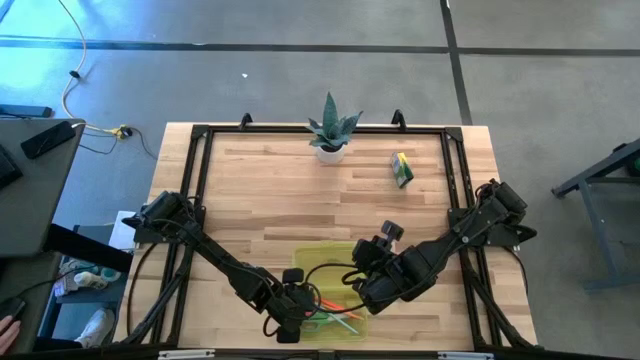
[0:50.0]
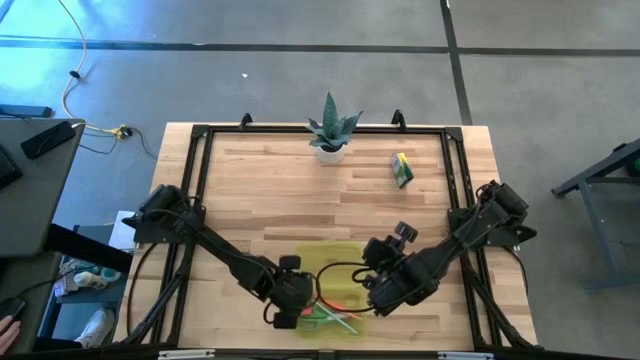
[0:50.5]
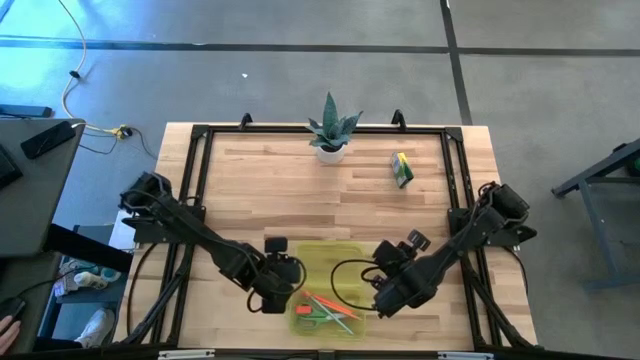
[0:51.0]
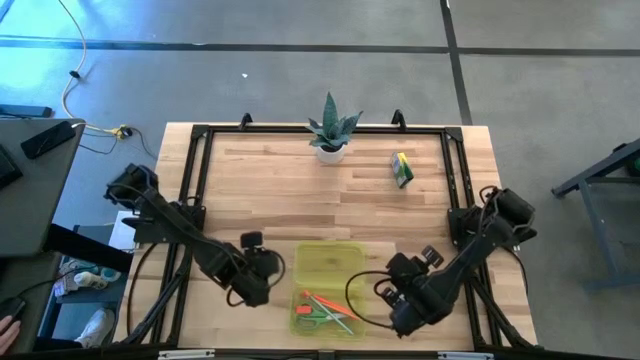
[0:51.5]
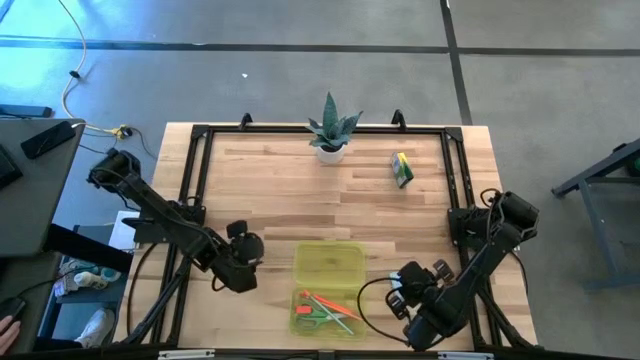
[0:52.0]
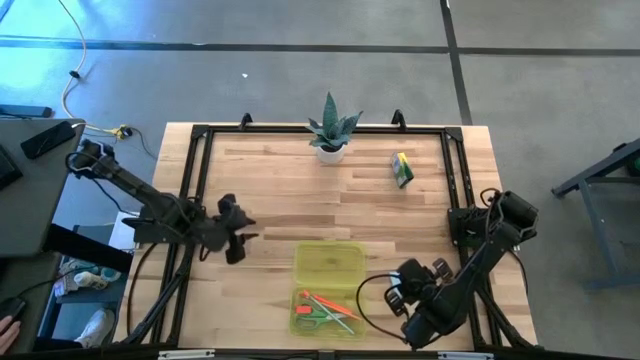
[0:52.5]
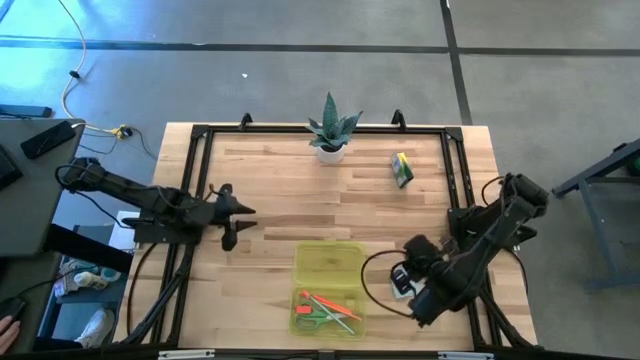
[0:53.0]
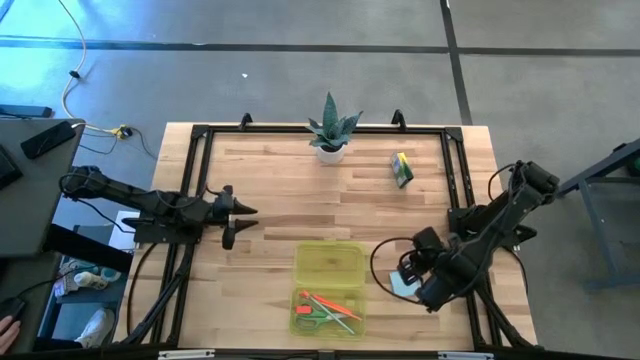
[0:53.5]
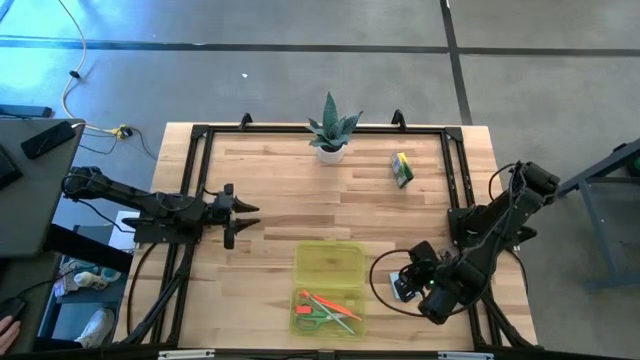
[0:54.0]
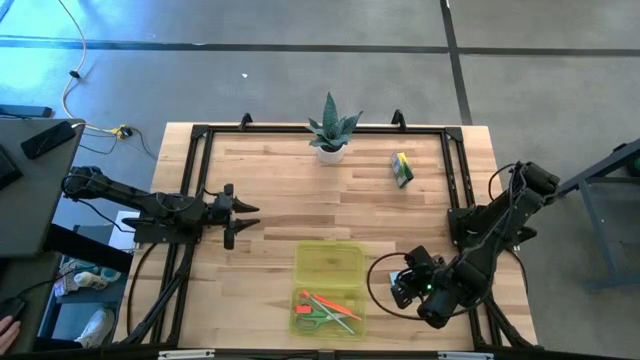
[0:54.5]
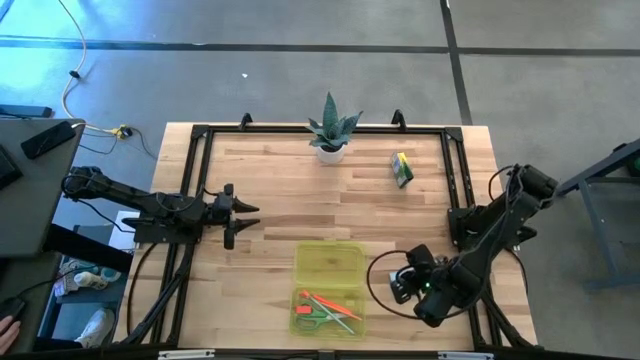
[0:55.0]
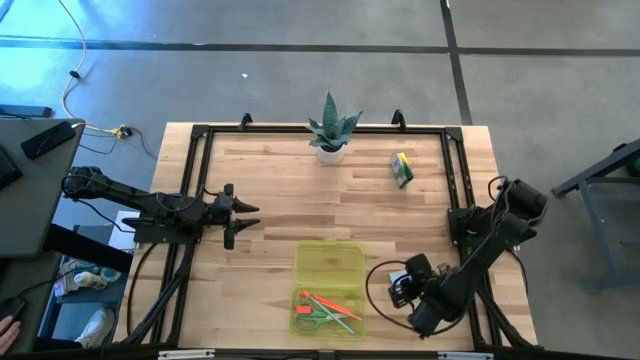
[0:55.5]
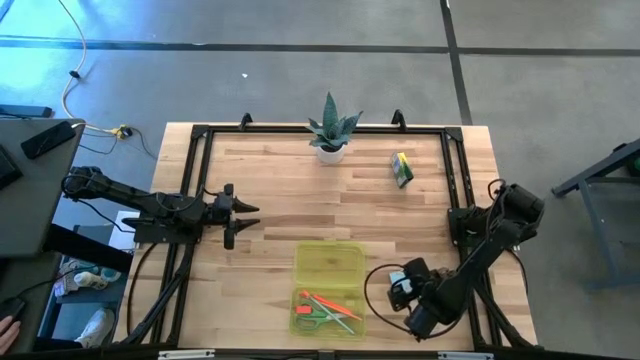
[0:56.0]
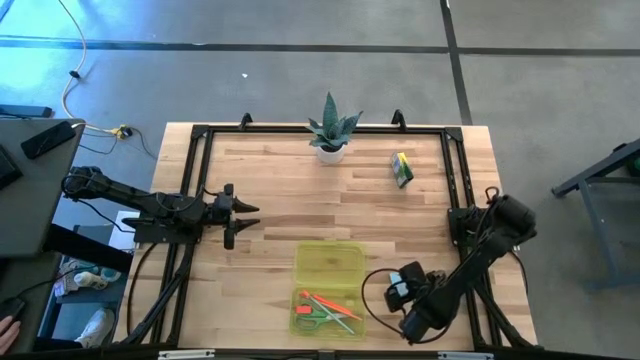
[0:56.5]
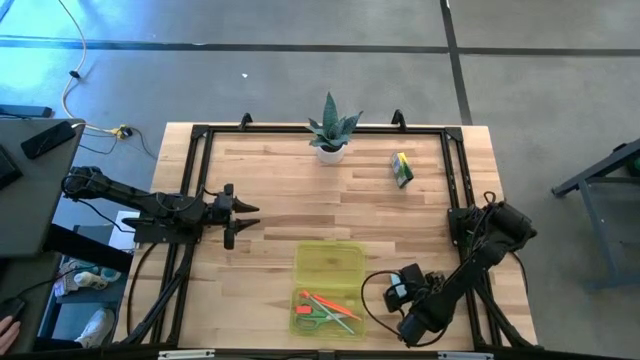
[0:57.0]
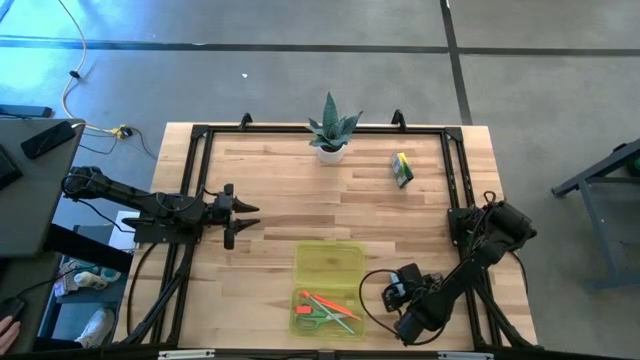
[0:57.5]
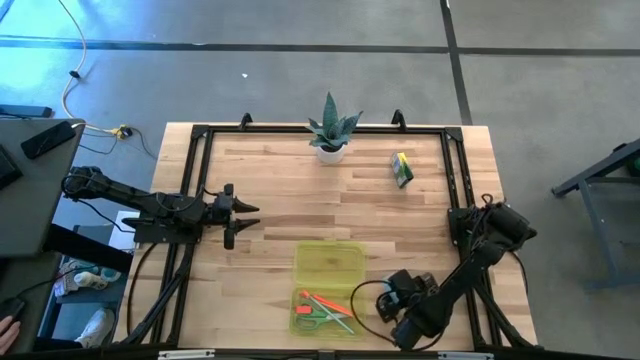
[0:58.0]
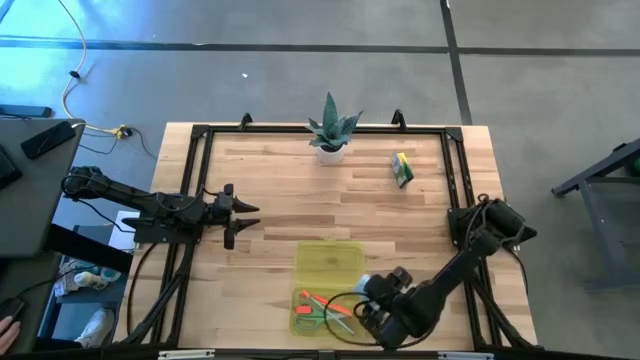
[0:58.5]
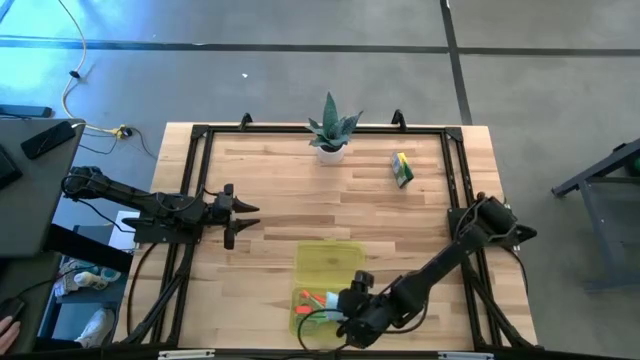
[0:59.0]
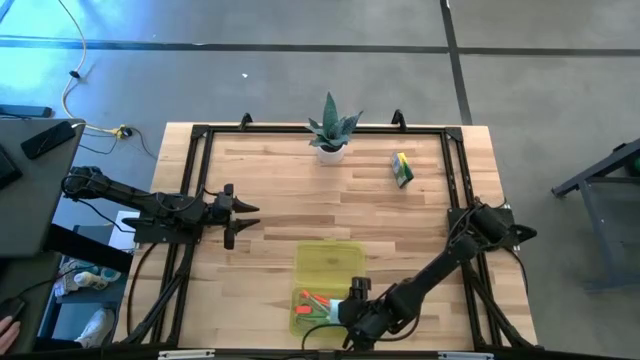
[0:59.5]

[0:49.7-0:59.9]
Task: Pack school essentials
Put the blue sticky notes into the yellow supply box

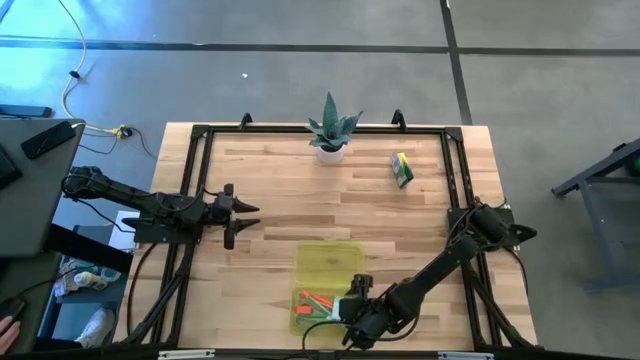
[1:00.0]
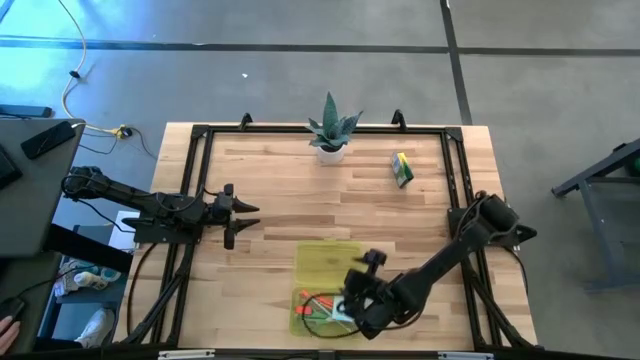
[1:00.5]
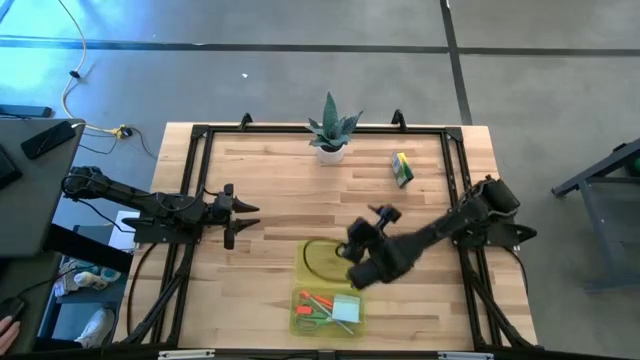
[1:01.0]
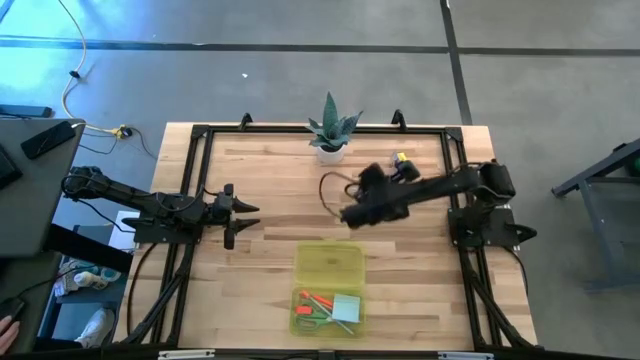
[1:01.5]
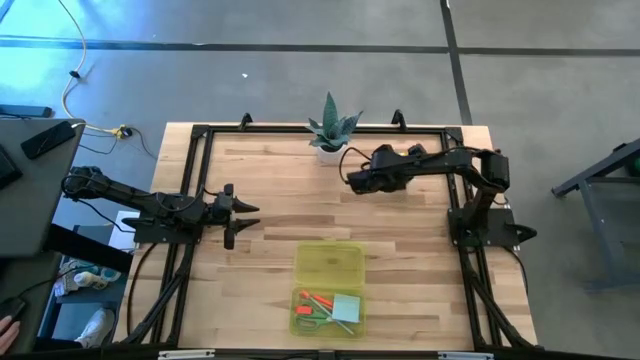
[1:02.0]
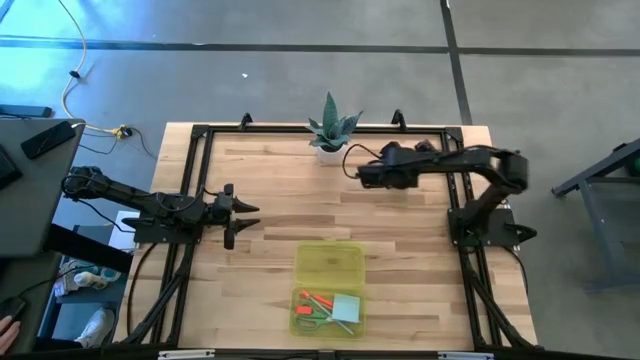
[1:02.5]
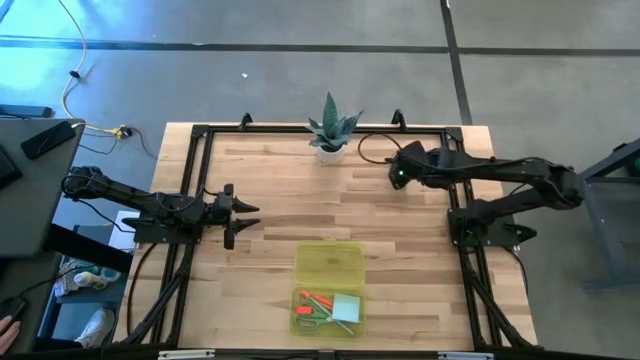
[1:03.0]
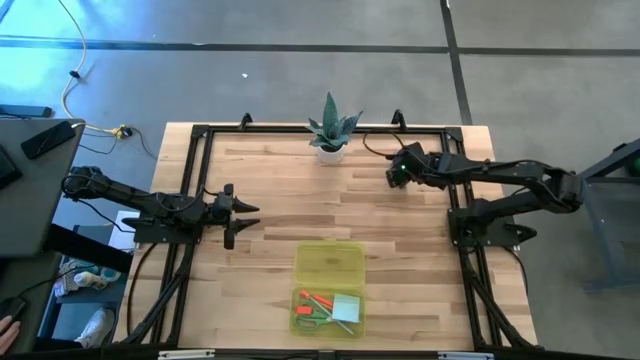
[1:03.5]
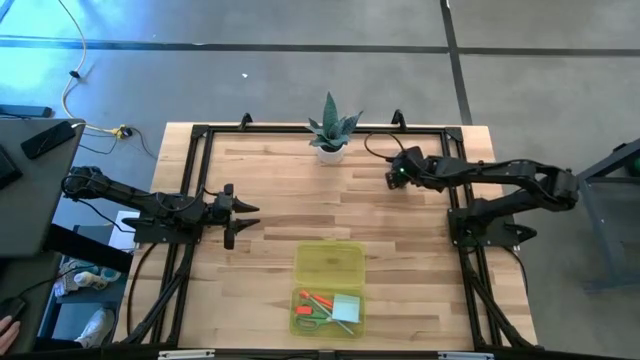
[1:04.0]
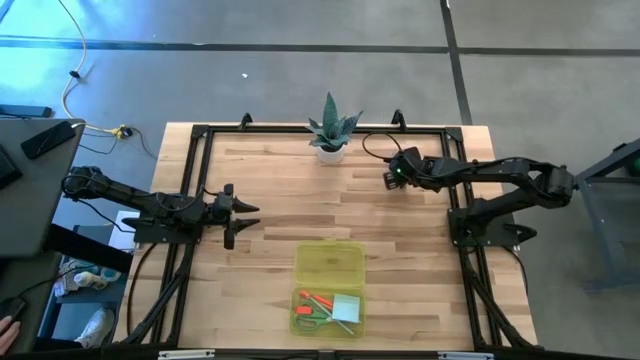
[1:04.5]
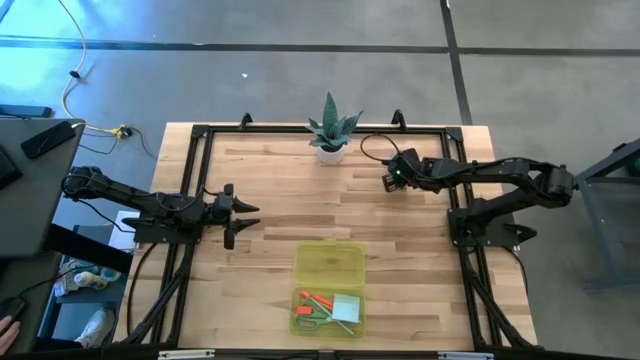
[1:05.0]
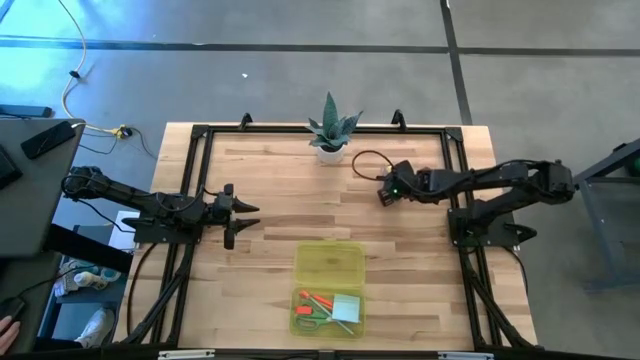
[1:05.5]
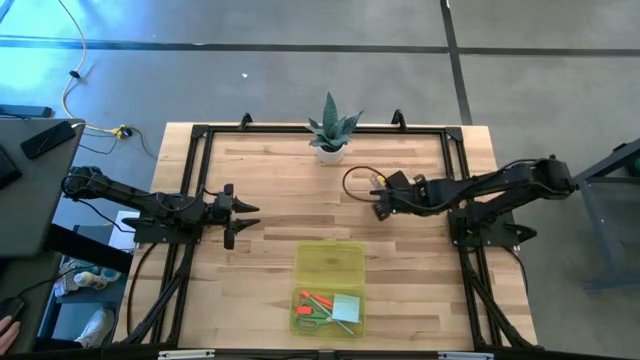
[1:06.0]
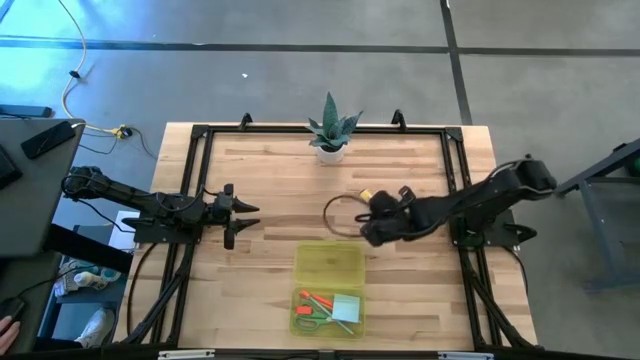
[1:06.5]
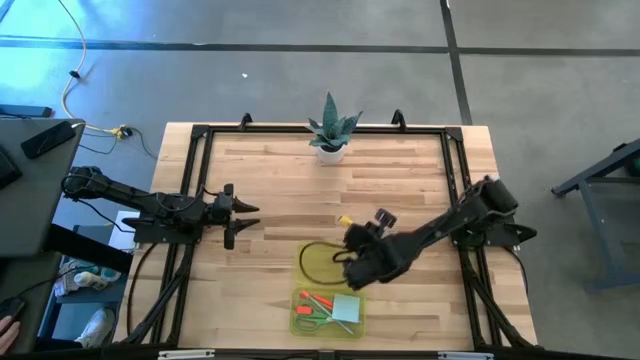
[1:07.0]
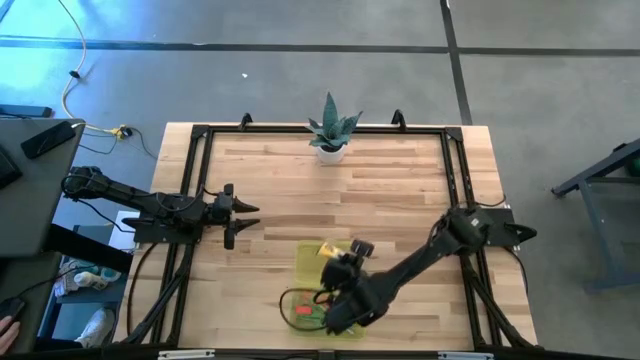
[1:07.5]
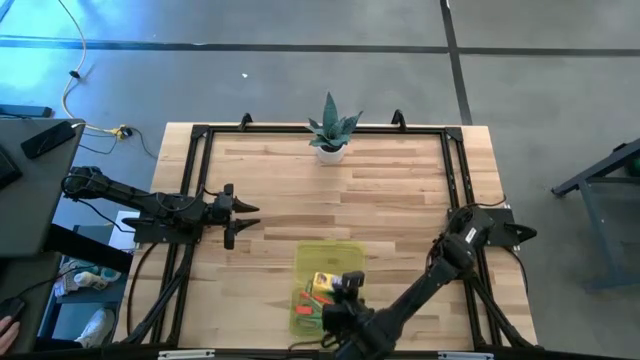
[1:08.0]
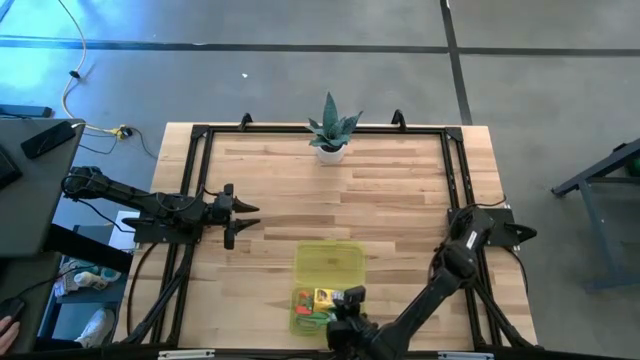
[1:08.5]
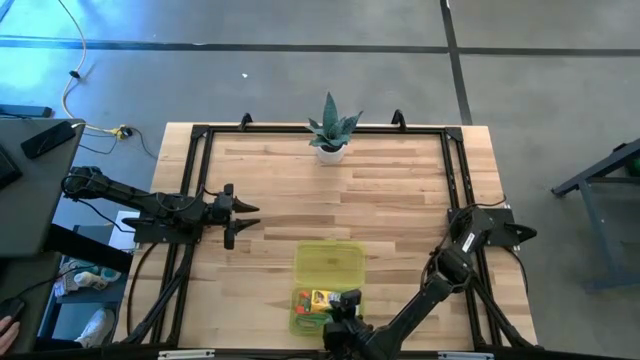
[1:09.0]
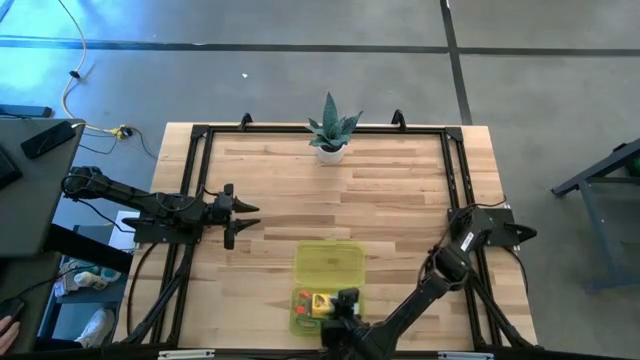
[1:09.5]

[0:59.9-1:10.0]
Put the yellow crayon box into the yellow supply box
